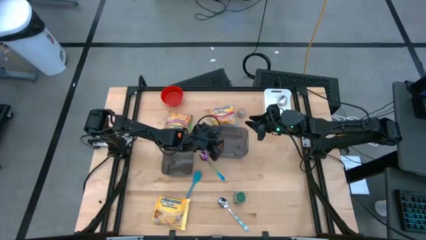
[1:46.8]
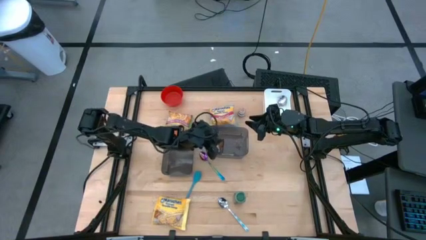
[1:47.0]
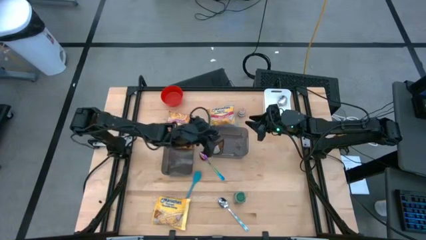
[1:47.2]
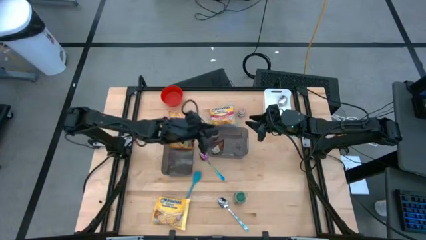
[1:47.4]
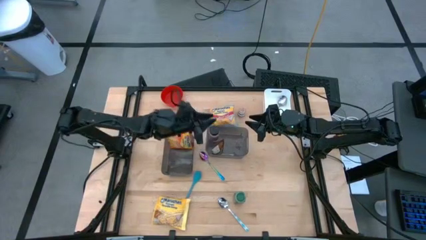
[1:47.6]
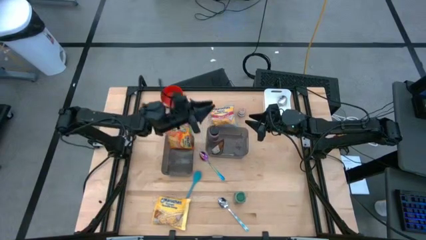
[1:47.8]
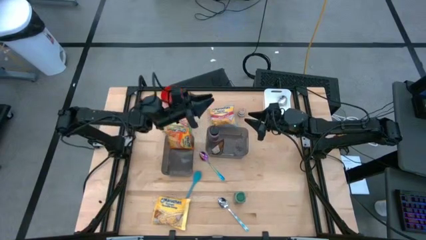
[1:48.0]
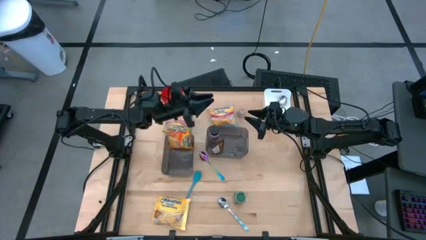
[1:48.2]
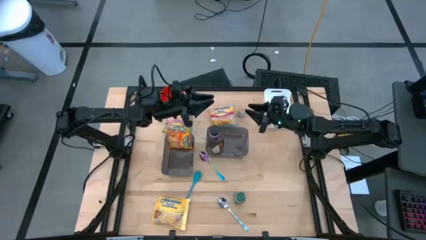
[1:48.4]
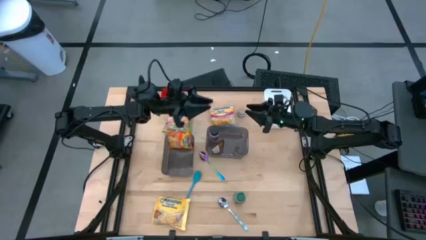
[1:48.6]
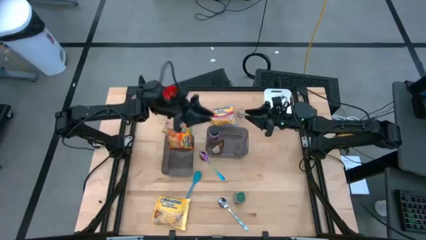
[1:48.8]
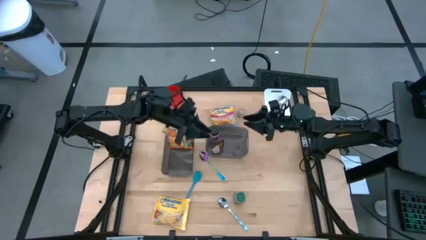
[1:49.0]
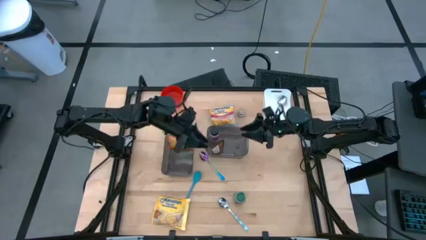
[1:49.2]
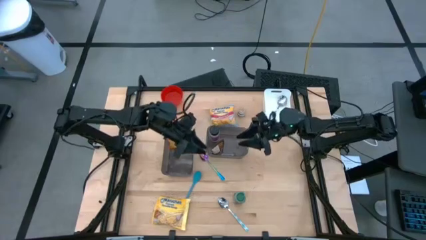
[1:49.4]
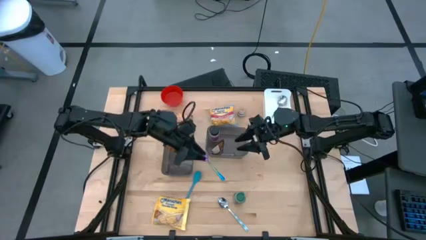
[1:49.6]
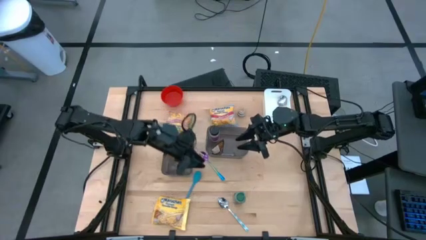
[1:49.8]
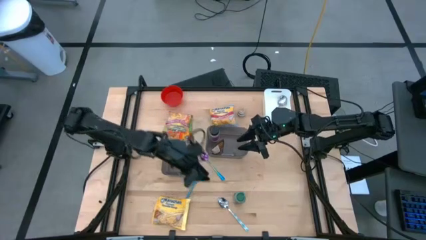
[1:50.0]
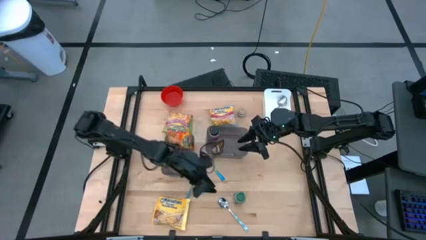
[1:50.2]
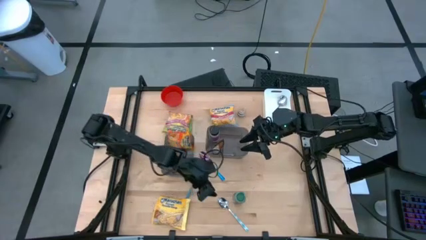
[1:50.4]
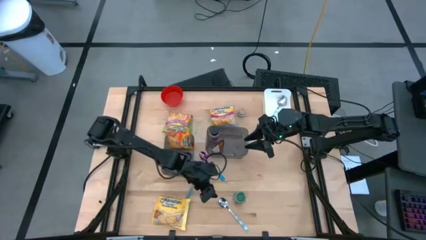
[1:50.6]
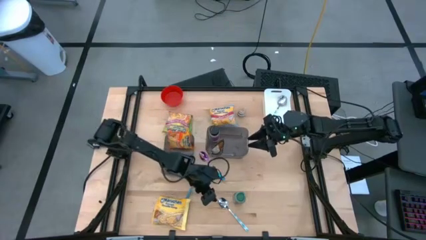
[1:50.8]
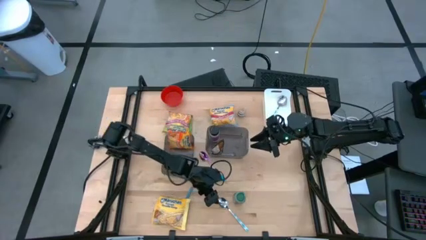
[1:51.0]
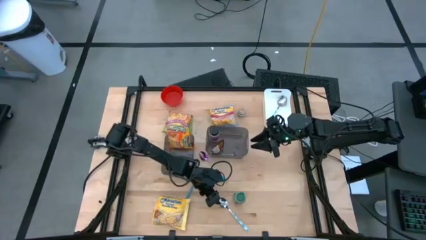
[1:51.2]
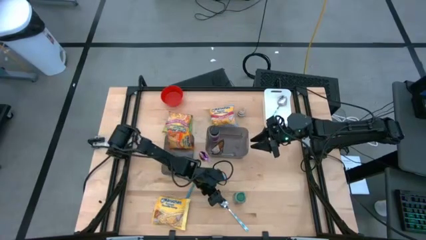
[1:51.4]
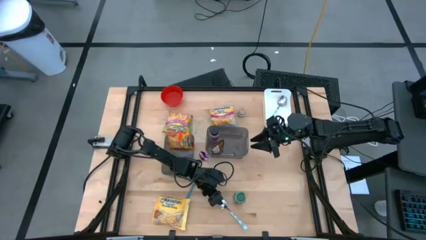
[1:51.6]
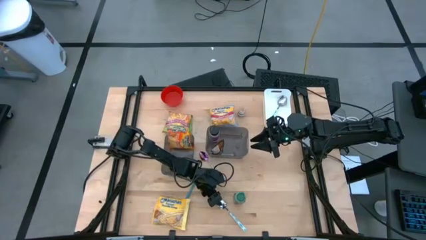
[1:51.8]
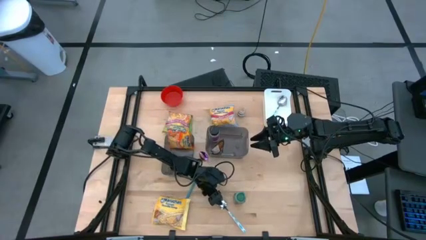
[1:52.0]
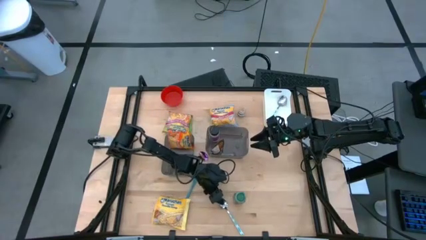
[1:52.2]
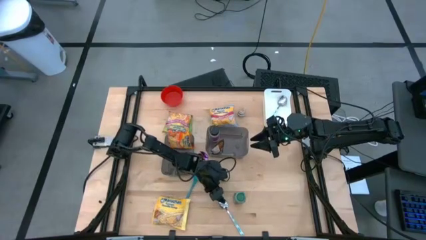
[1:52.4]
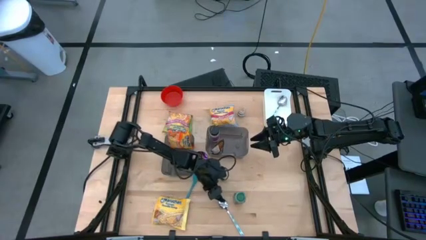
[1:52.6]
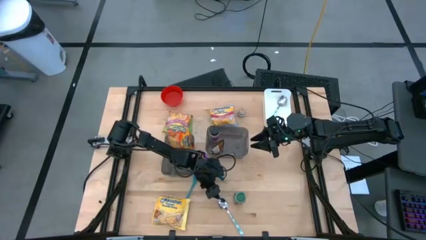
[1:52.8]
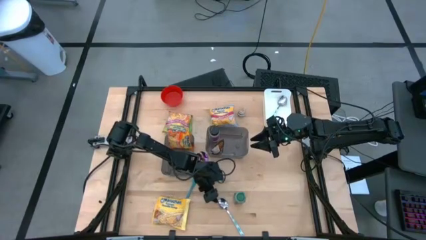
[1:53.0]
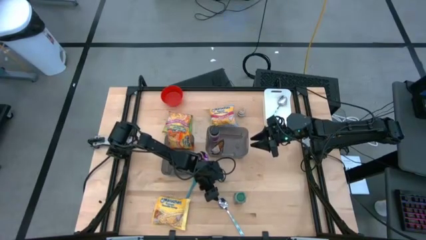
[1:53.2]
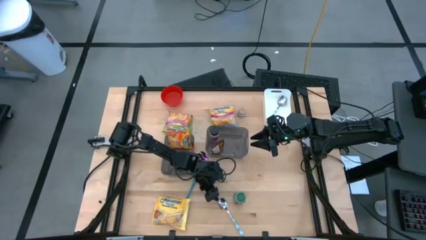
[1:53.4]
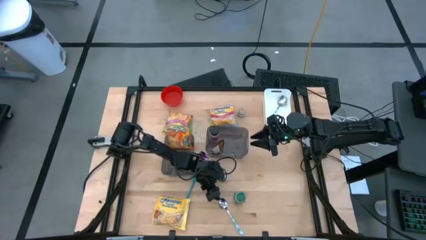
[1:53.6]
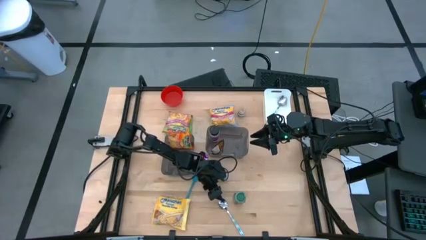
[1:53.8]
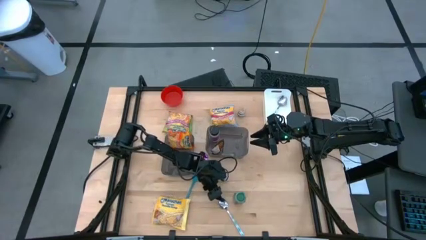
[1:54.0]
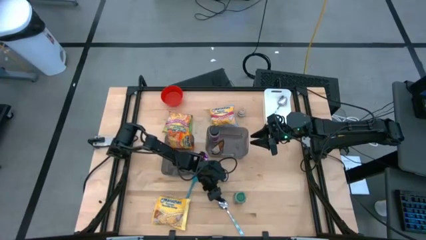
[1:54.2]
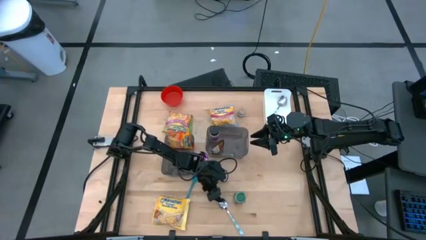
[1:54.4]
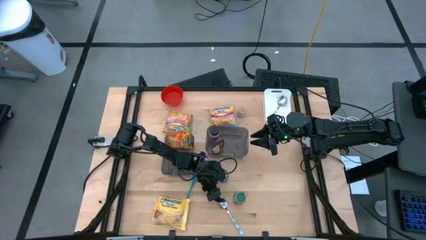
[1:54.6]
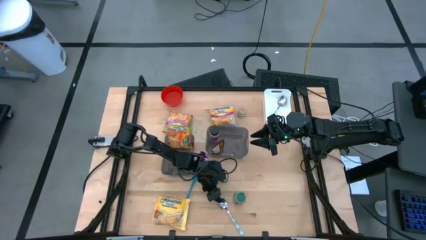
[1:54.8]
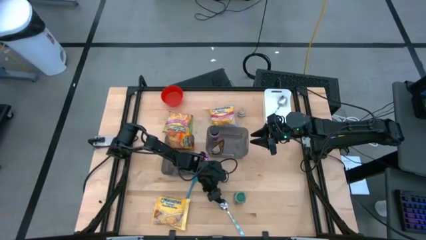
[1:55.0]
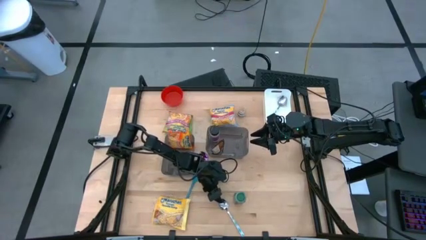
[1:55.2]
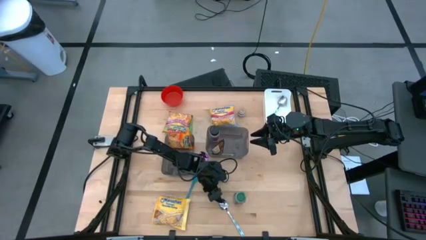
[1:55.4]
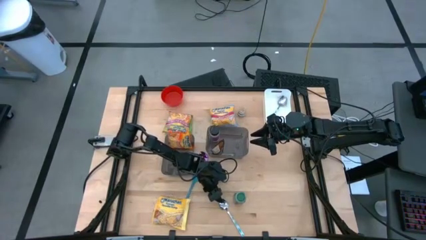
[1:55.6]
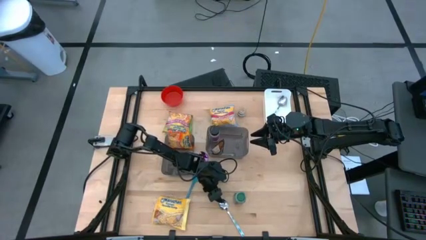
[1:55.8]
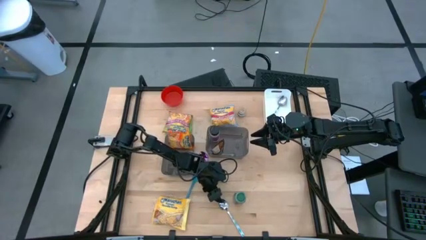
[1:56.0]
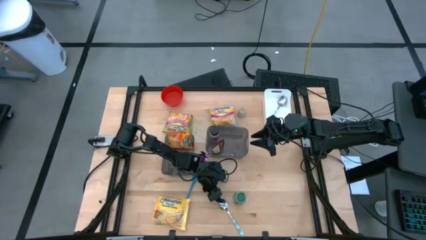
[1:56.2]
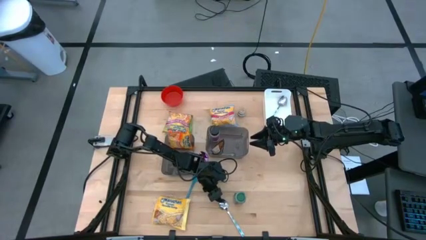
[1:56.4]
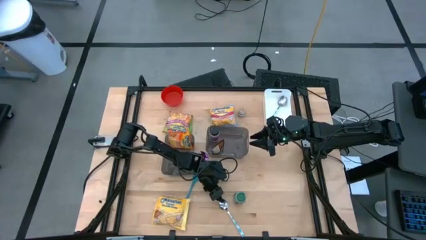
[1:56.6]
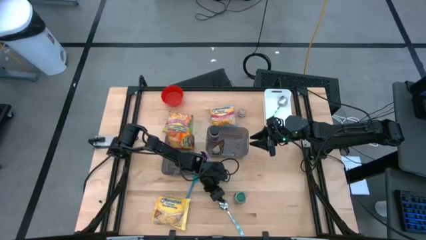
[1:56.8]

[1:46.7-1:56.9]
Task: Pick & Place Food Item
Put the blue patterned spoon into the white bin

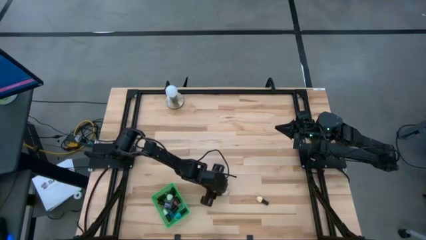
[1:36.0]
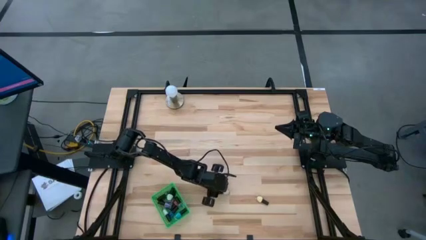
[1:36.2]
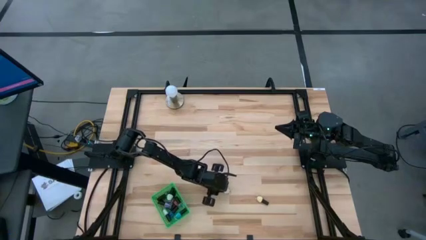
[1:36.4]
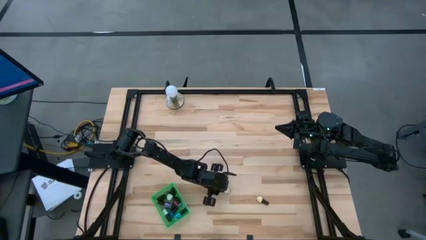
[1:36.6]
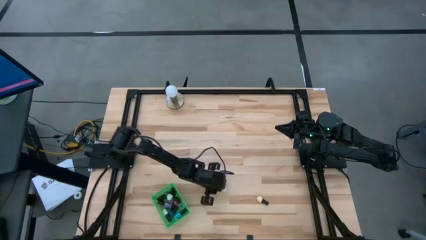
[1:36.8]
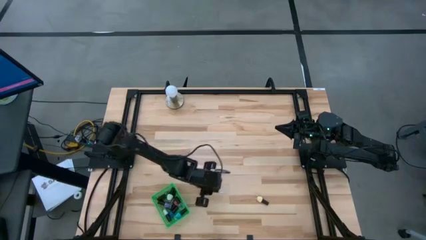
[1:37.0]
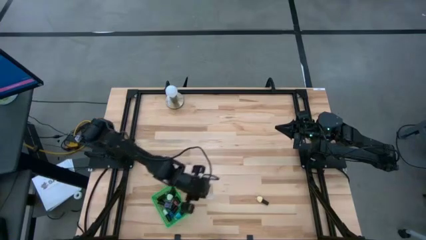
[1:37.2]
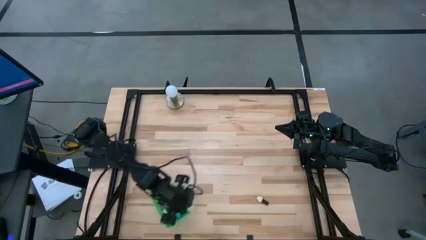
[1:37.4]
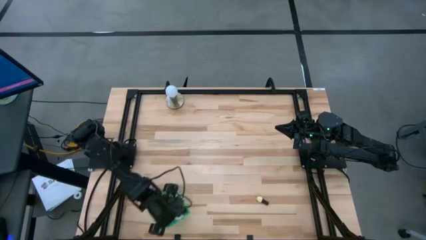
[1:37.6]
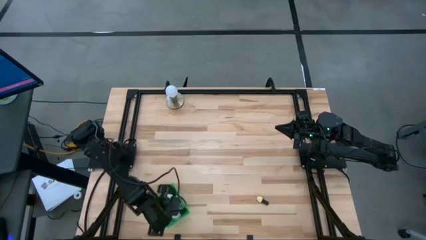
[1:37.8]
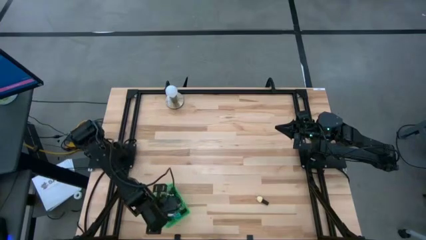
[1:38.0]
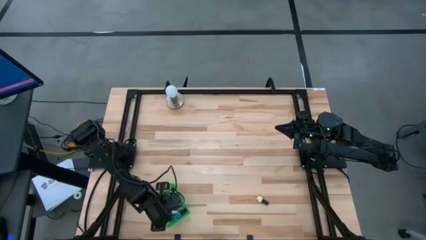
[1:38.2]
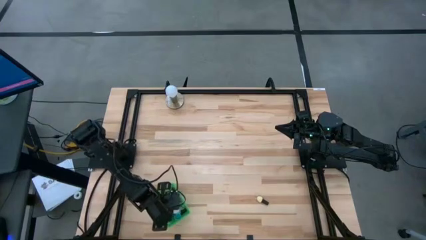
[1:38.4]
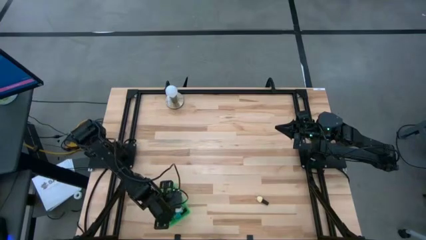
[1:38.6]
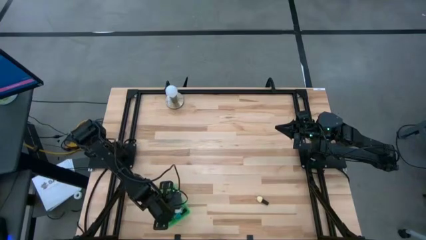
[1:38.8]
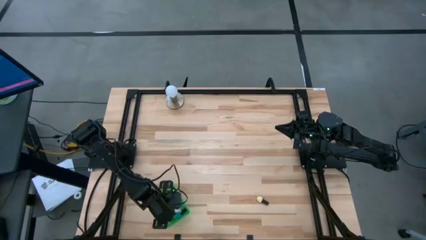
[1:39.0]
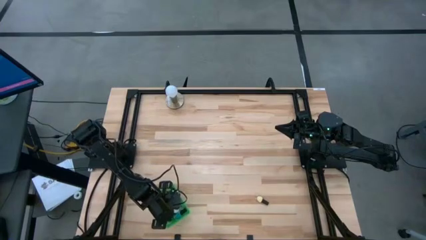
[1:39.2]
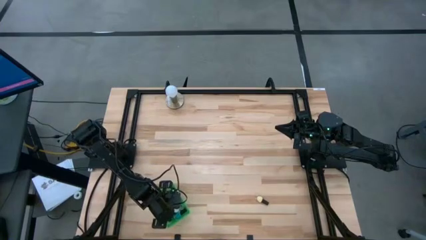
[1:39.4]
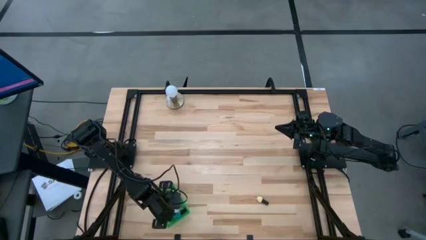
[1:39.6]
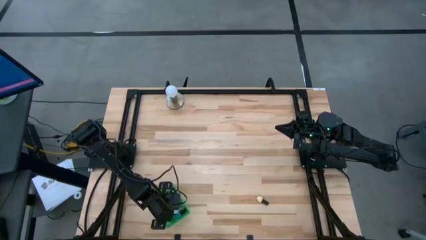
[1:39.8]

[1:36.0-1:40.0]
Task: Pick & Place Nail Polish
Put the black white nail polish bottle into the green basket
